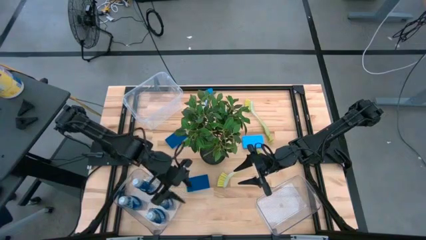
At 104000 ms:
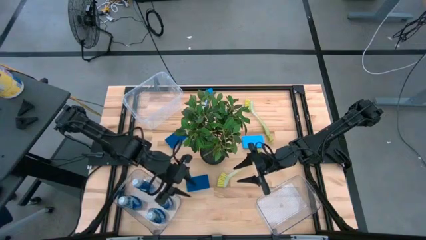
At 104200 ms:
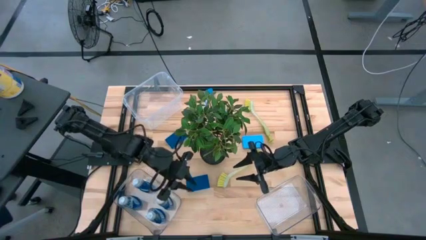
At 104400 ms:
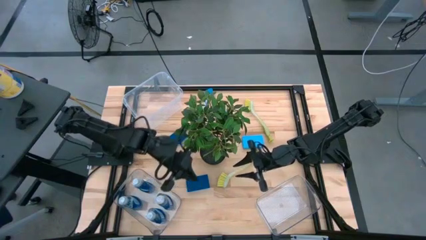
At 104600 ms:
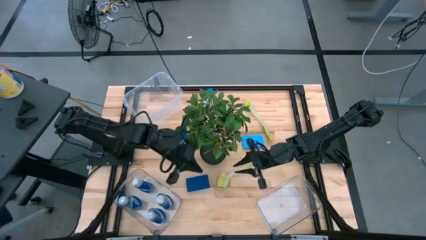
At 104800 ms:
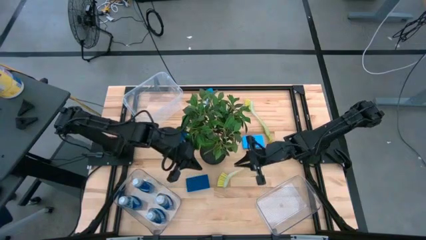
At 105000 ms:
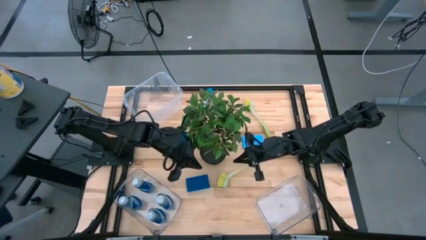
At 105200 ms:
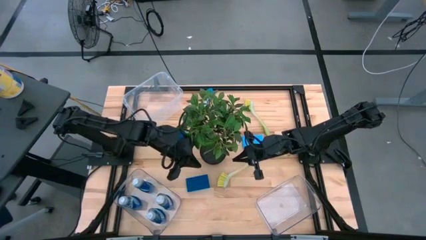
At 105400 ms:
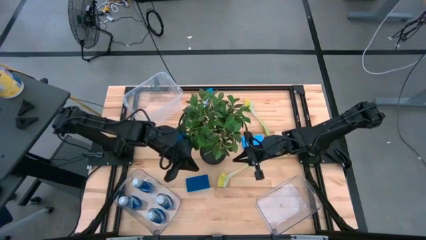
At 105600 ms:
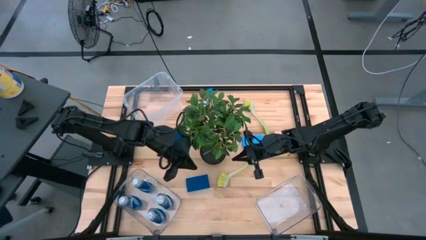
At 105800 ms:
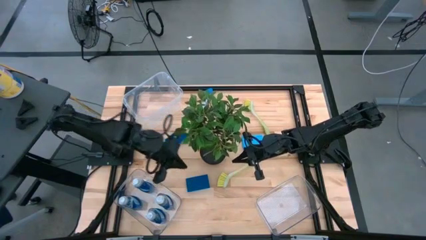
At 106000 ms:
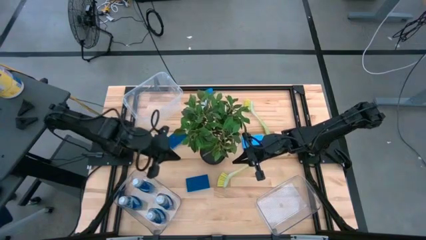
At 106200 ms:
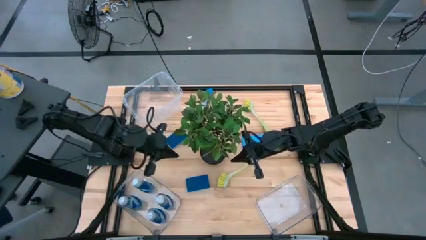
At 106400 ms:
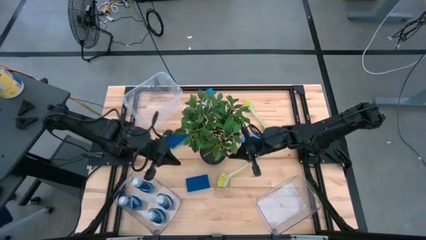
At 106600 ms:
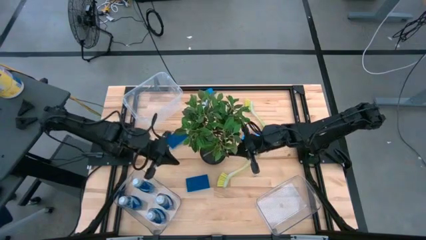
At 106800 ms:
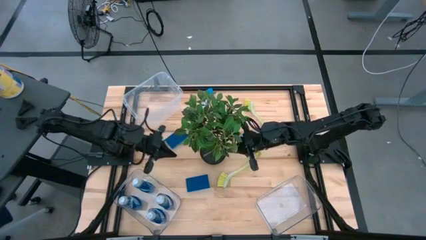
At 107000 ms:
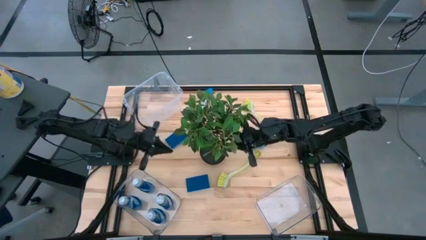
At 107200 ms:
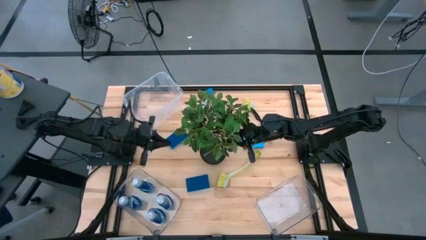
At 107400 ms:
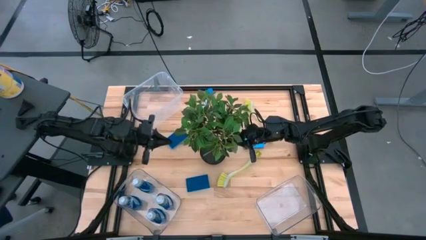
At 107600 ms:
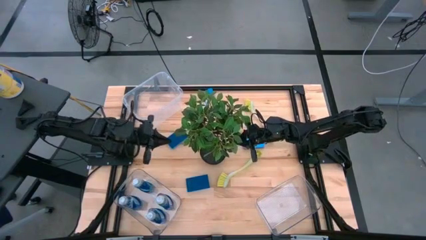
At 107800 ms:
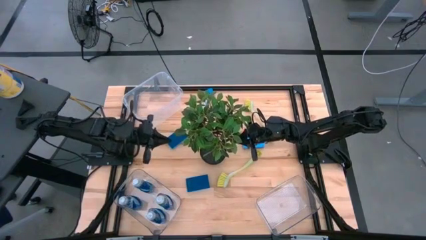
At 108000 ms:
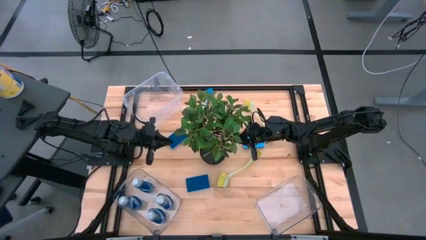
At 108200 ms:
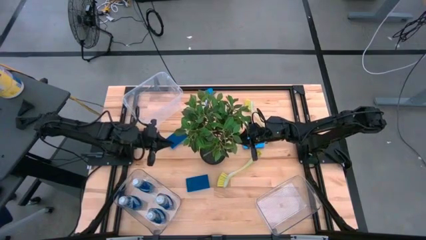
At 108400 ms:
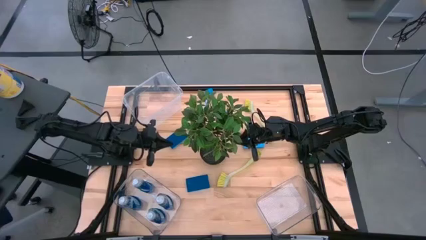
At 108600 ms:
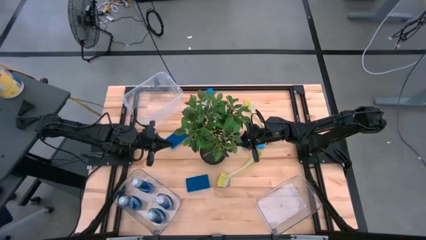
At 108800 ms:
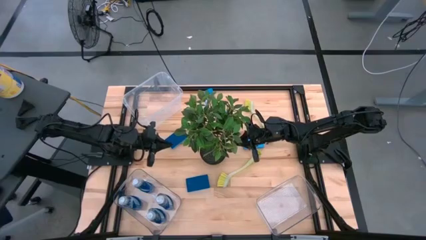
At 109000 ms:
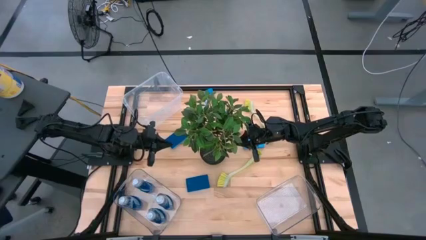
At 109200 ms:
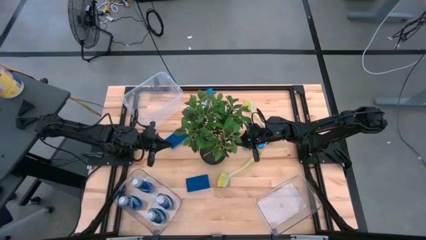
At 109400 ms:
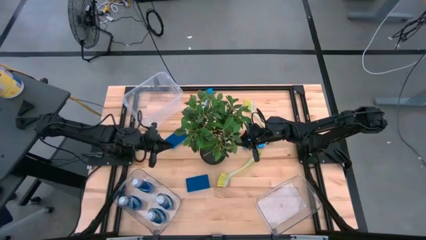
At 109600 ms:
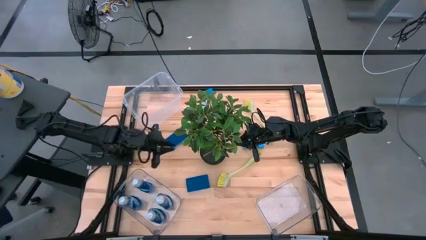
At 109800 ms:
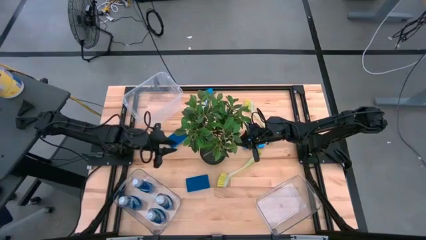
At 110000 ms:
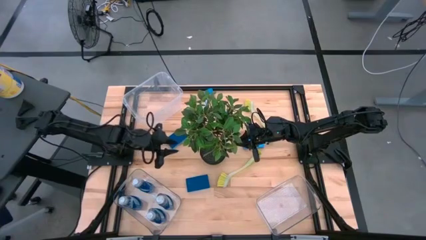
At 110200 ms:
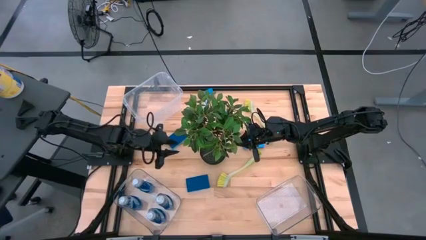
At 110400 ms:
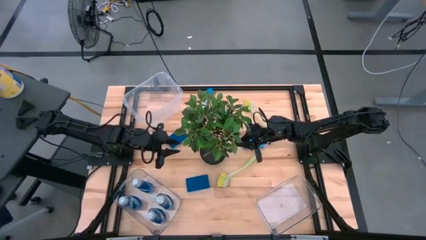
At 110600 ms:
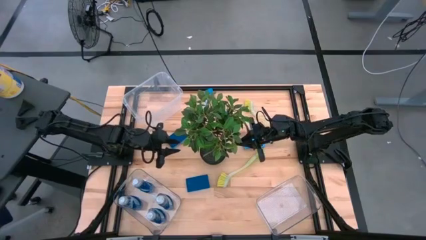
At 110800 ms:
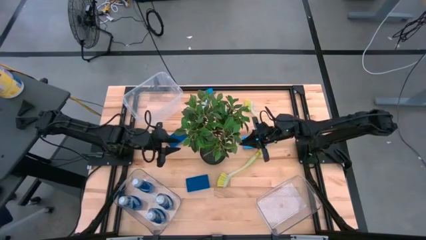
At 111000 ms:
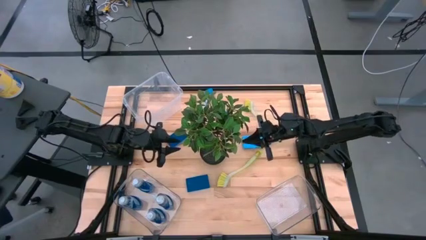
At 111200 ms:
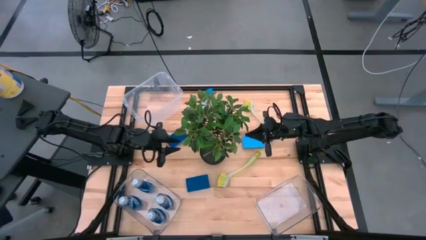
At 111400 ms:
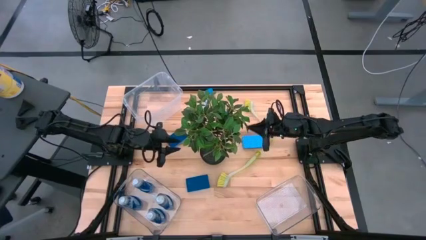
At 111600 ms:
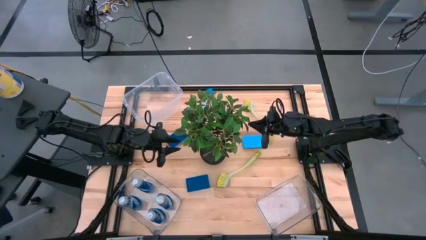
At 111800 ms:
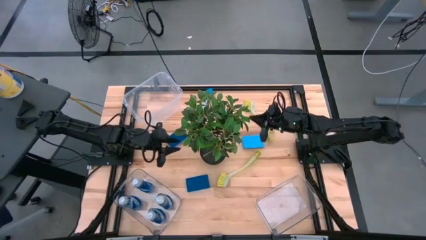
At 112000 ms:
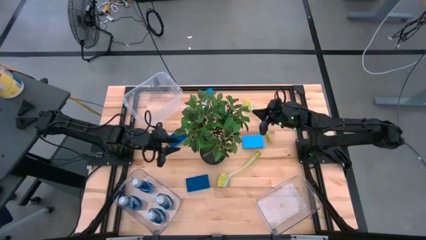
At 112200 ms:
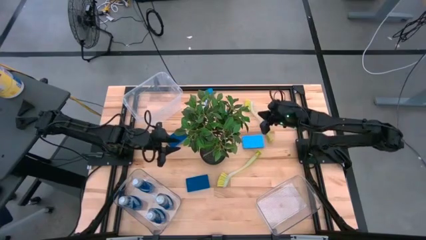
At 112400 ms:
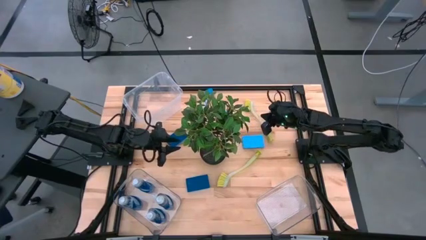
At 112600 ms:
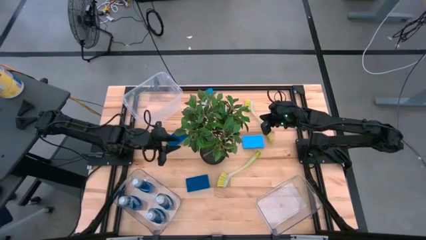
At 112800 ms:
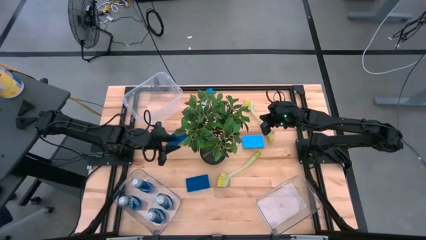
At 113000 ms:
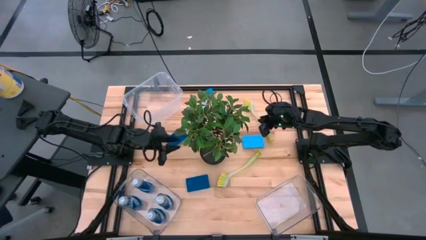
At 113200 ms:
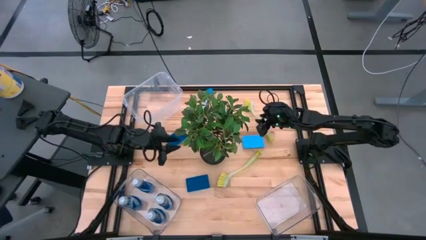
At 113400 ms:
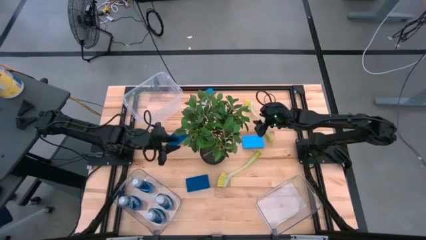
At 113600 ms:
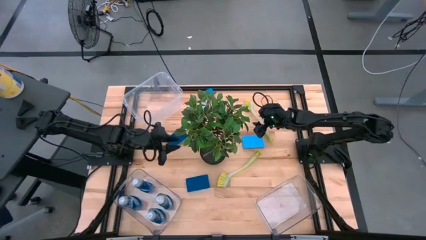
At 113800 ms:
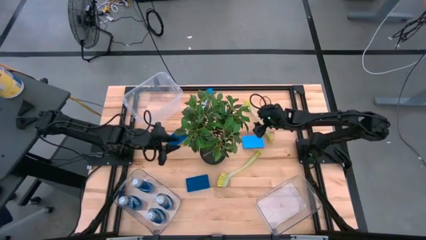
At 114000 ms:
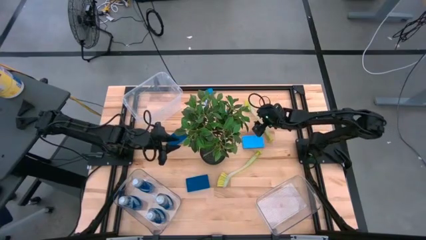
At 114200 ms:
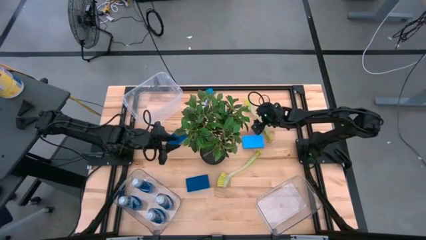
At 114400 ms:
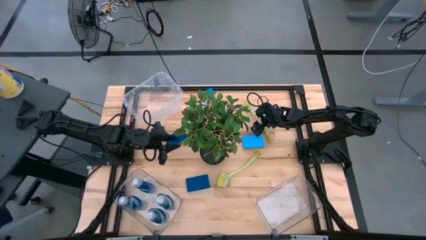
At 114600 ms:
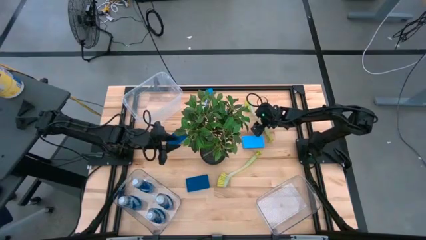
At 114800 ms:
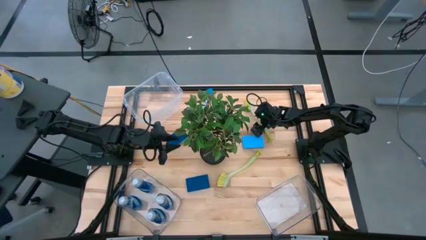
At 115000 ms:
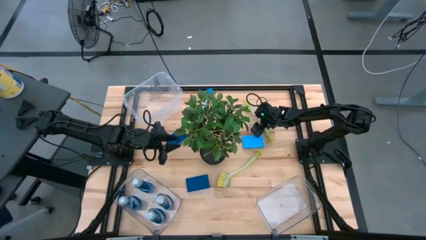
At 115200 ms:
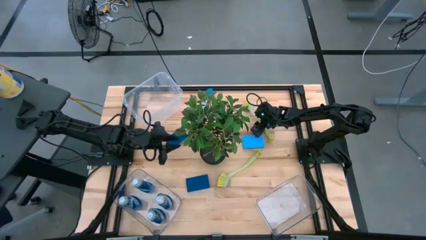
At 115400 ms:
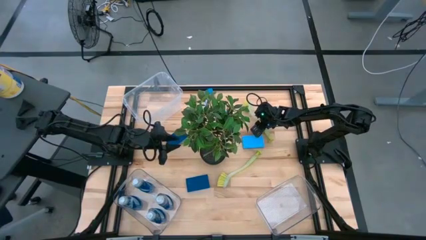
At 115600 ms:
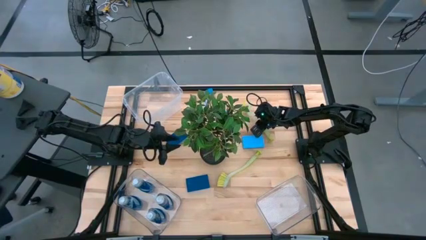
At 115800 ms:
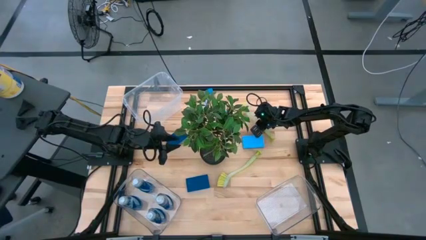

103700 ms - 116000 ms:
Task: Pick & Place Kitchen Sink Supplies
Put the green kitchen brush into the top transparent bin

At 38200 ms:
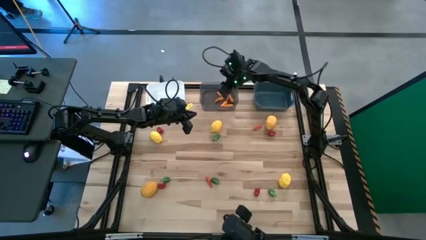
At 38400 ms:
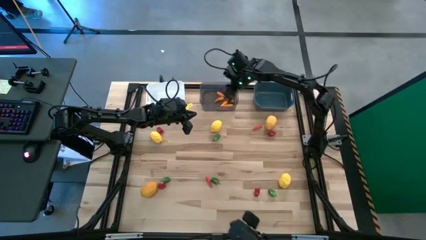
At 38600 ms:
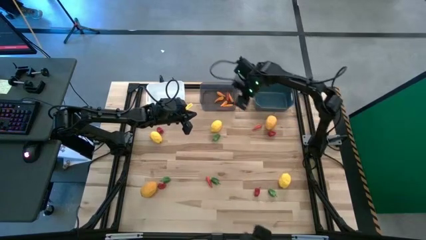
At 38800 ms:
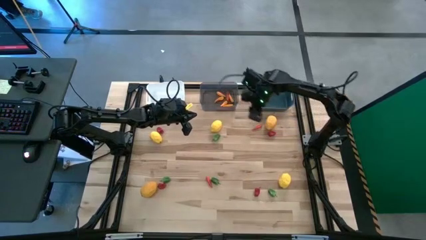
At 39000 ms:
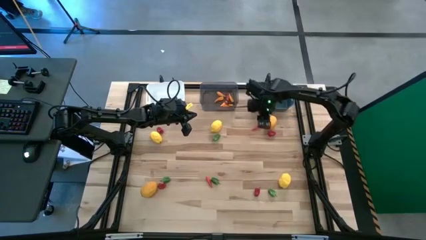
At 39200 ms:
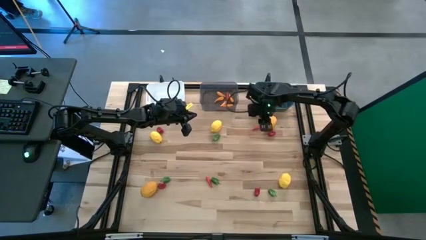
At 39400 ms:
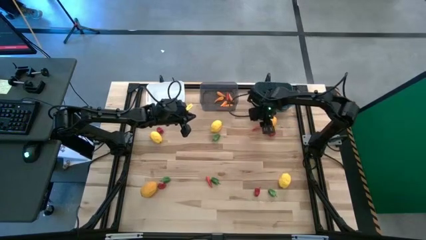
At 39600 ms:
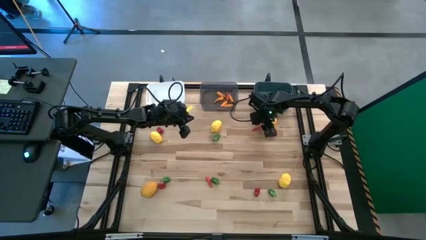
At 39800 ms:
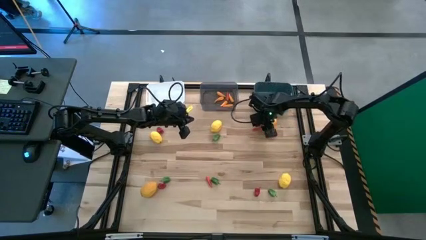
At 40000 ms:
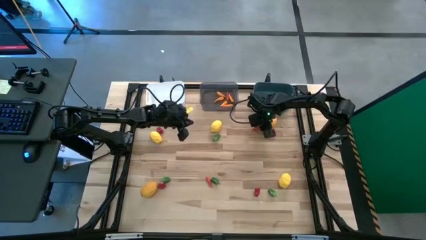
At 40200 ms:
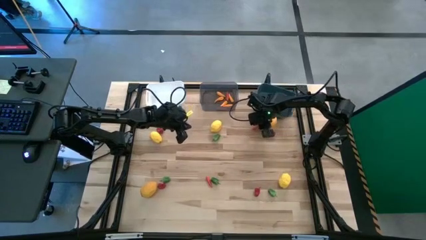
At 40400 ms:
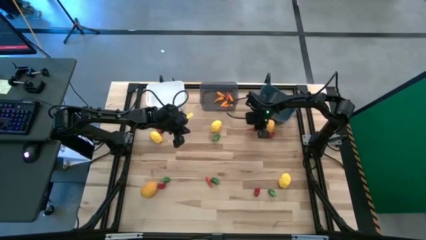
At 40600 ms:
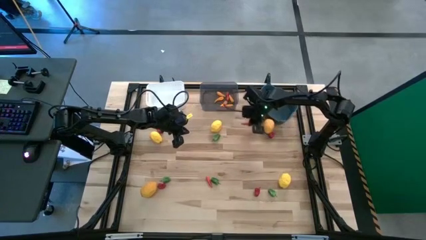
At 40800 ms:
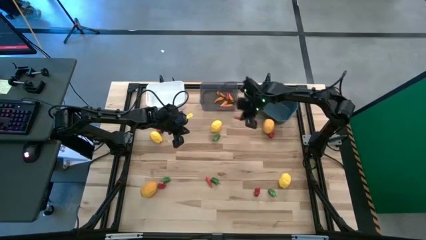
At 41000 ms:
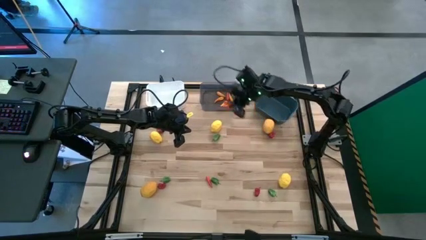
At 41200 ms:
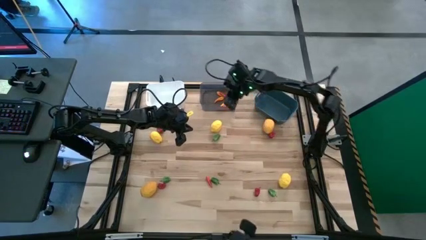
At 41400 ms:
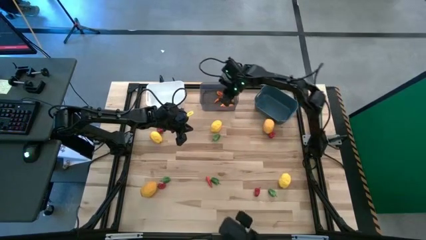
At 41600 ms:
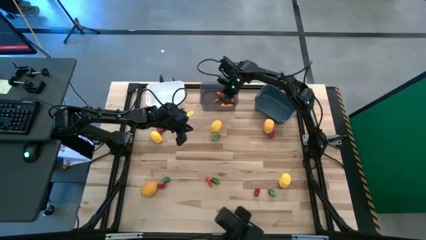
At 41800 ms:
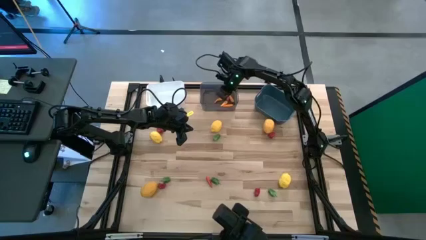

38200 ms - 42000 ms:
Task: Sort produce into baskets
Put the top orange chili pepper into the black bin

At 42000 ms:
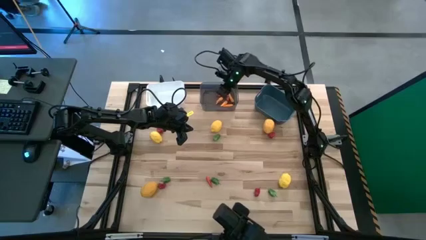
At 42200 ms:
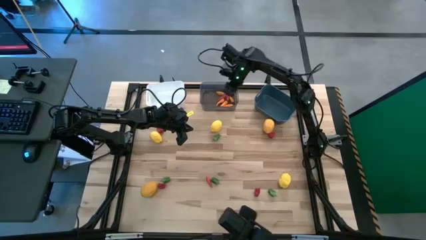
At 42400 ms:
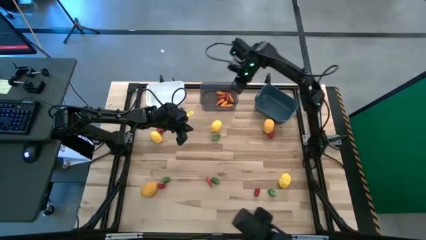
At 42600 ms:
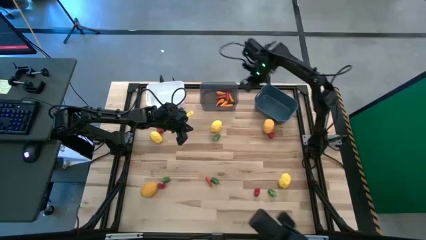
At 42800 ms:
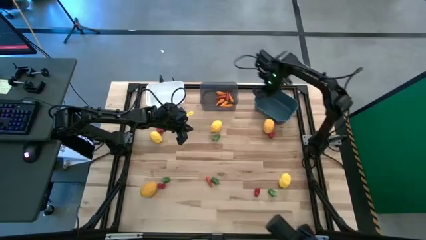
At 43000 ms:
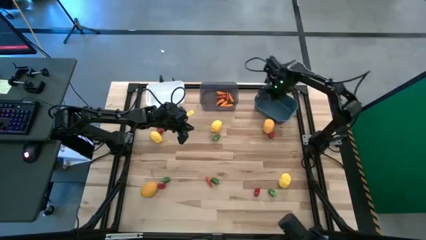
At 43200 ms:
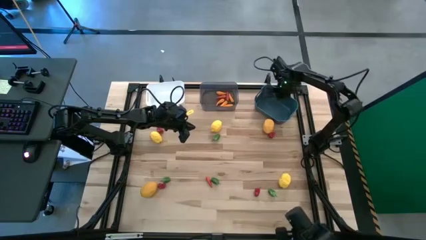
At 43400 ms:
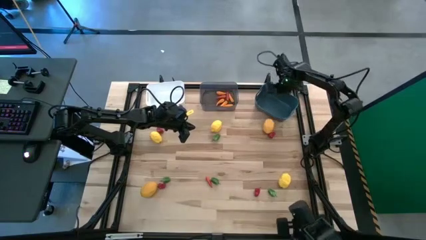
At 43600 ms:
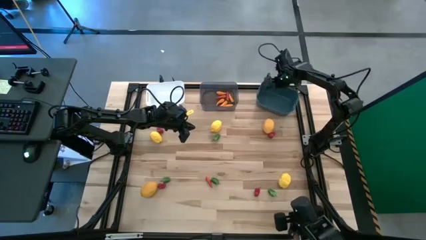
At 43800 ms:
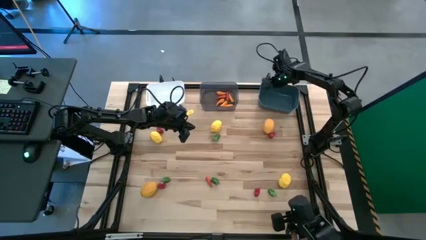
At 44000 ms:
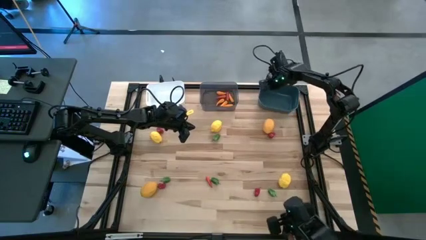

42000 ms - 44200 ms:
Adjust the blue bin
